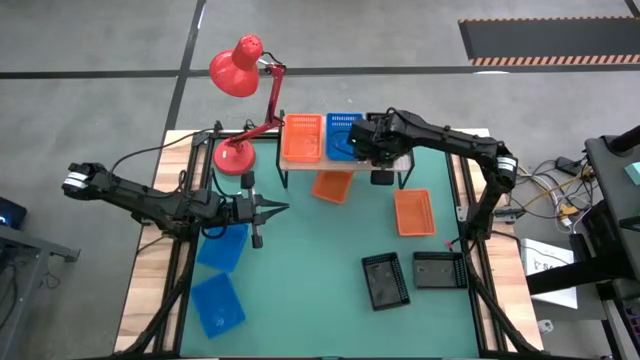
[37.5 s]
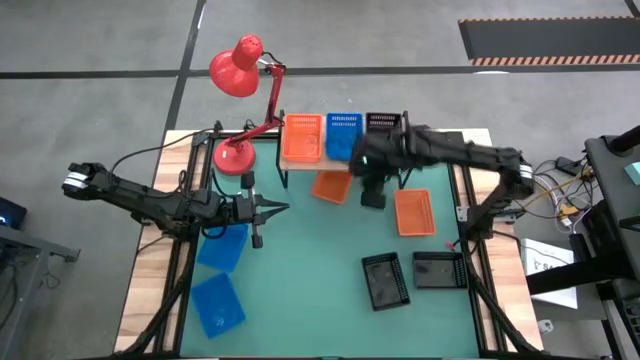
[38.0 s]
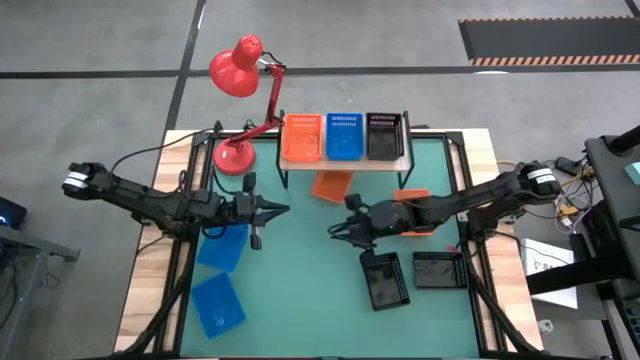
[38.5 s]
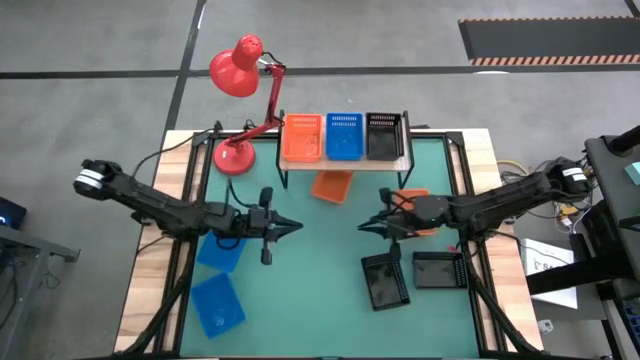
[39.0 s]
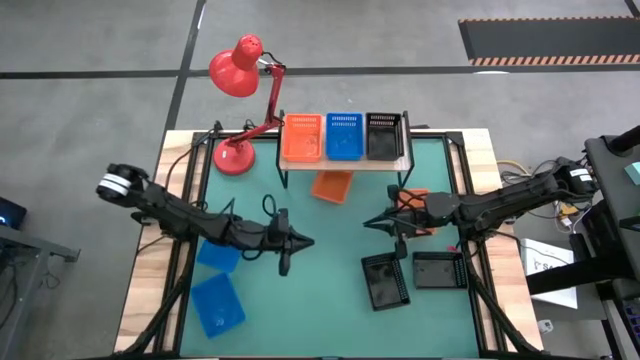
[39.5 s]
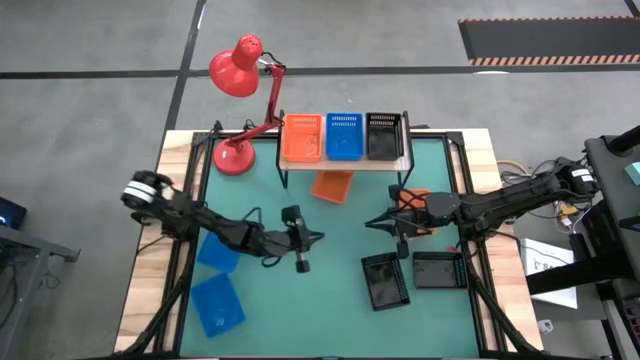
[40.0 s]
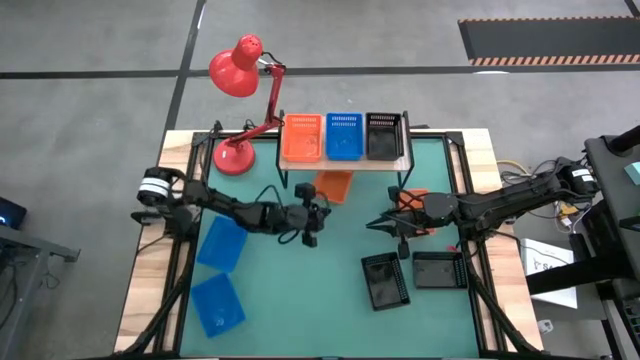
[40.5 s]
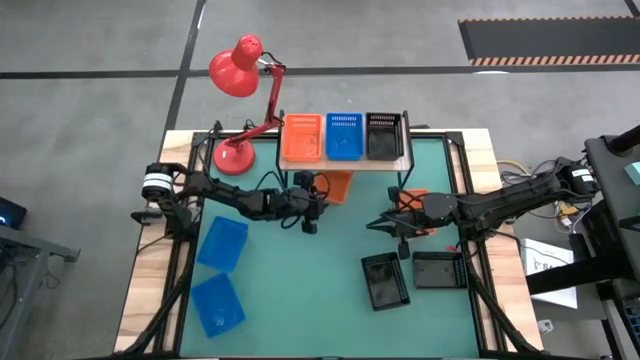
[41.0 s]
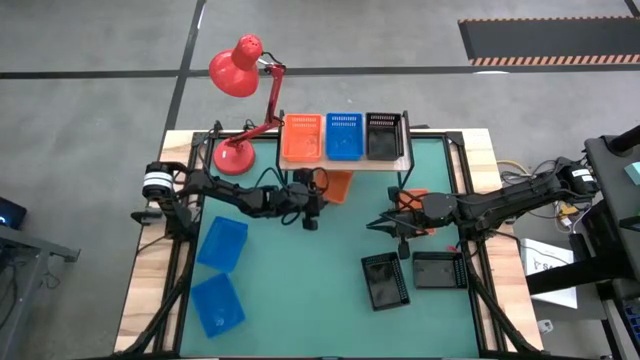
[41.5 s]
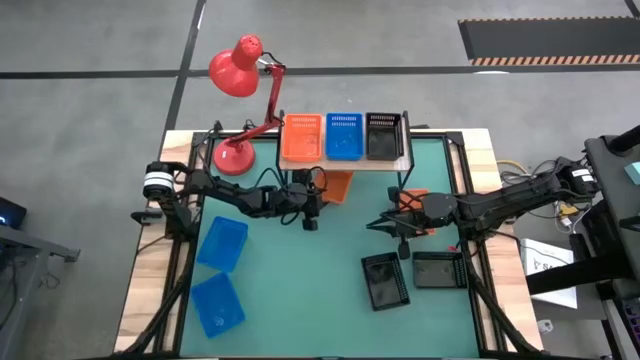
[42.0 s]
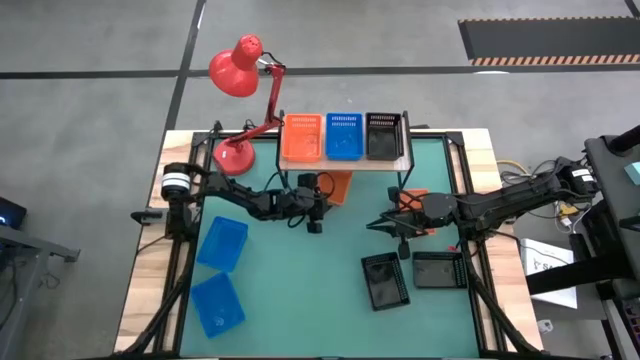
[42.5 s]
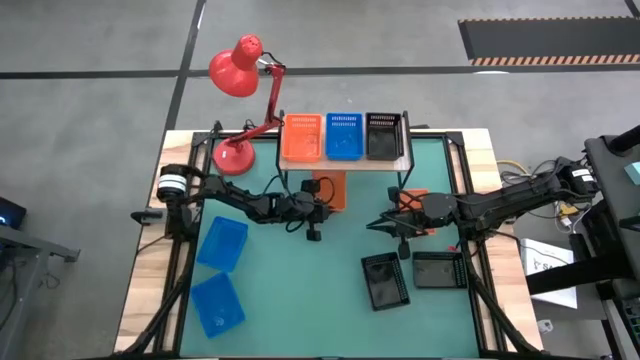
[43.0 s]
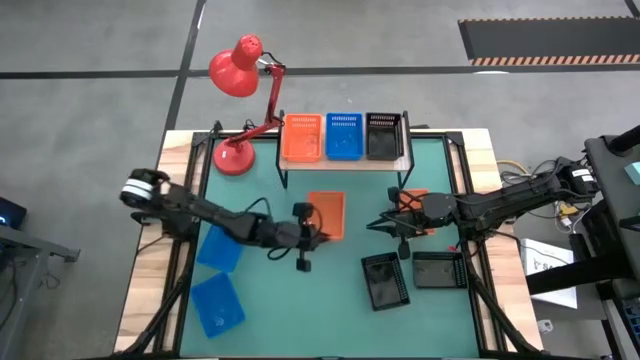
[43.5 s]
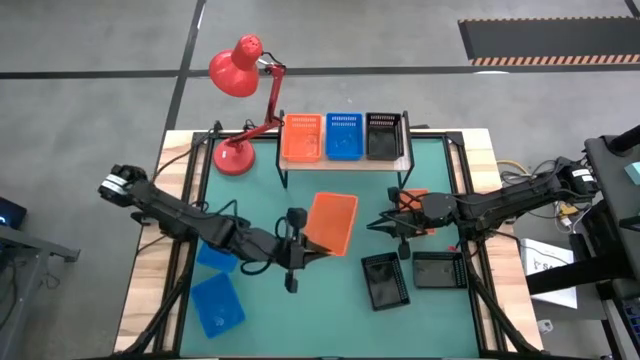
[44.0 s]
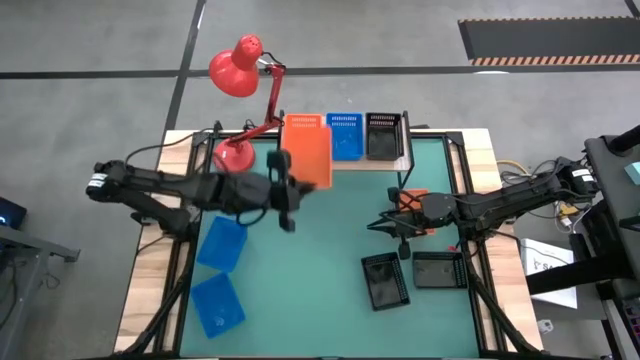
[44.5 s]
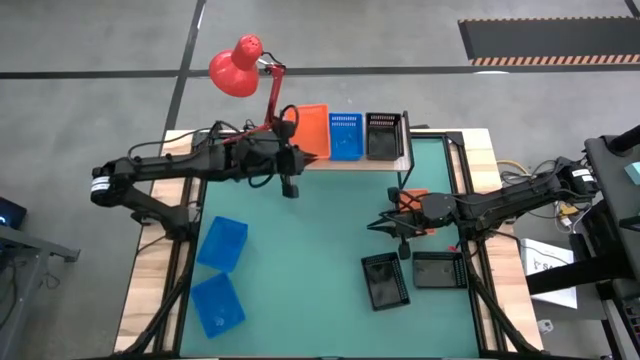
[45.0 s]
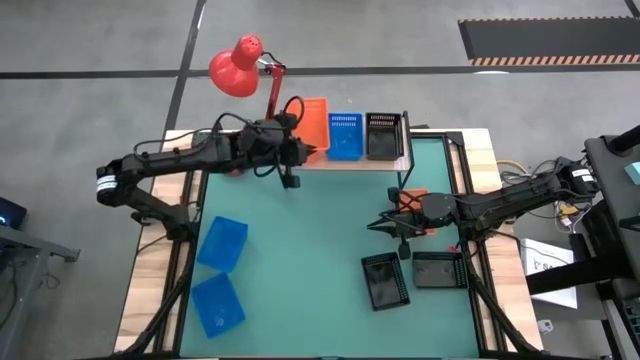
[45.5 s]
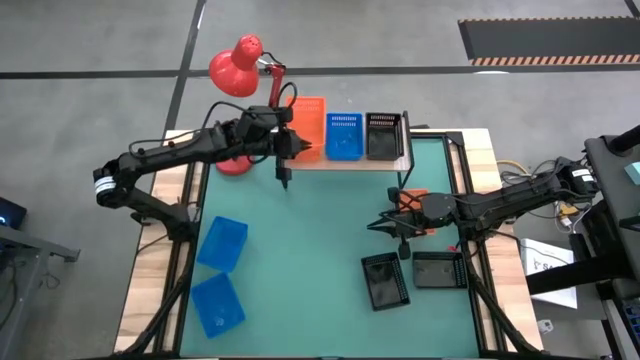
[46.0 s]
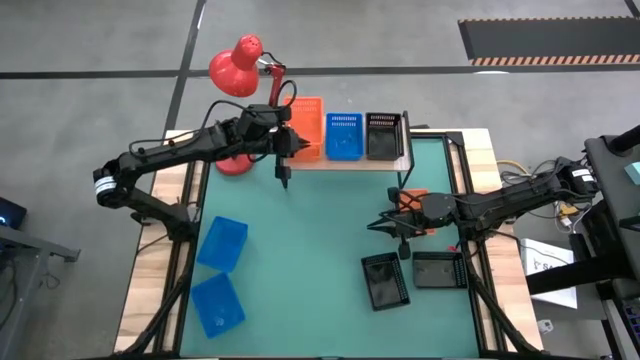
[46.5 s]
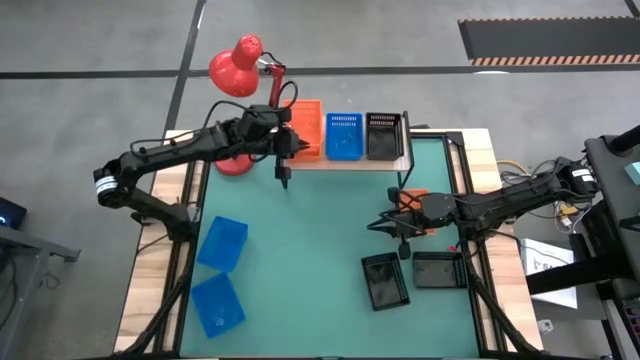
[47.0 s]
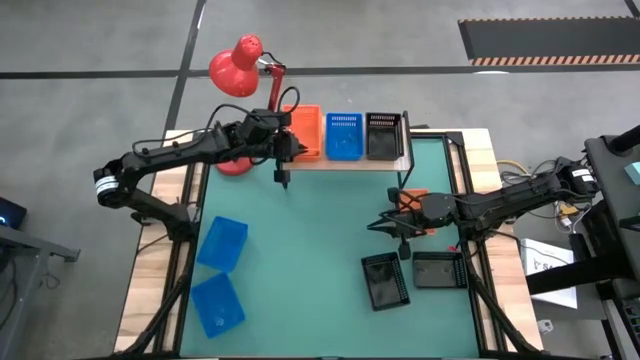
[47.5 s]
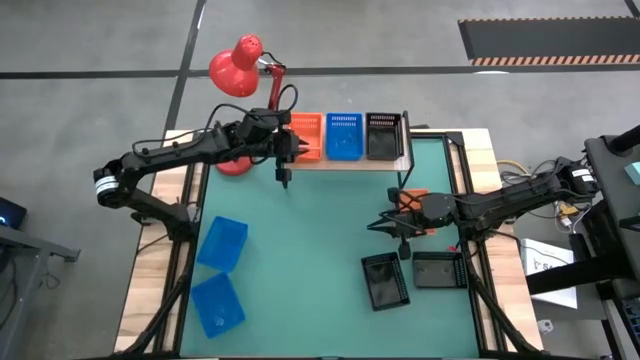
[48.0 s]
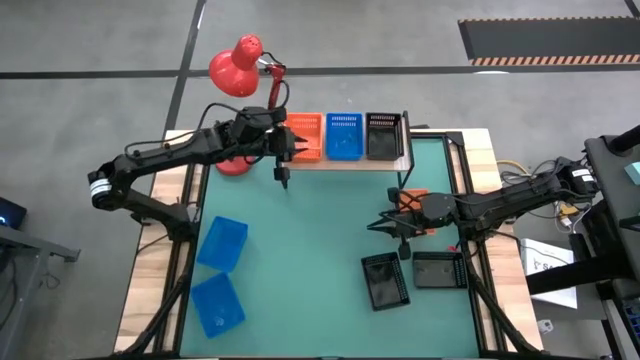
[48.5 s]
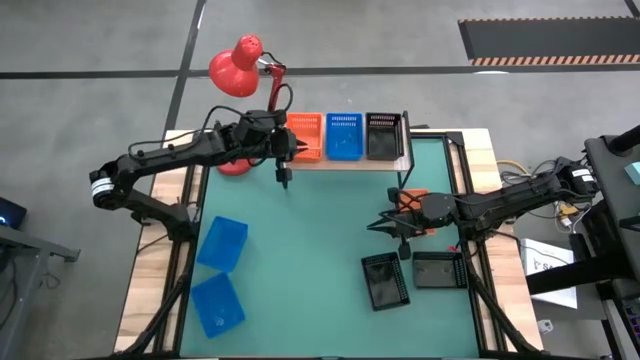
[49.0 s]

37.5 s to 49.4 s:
Task: Stack baskets on shelf by color
Stack the top orange bin on the other orange bin on the shelf

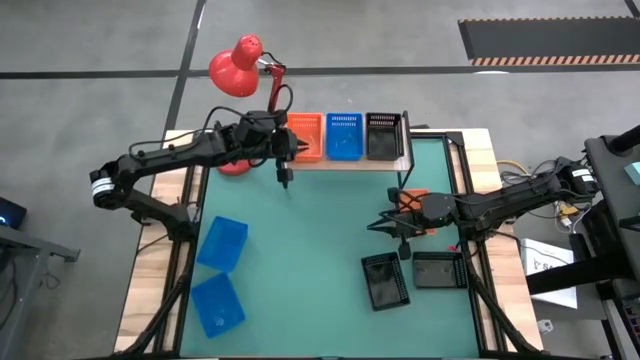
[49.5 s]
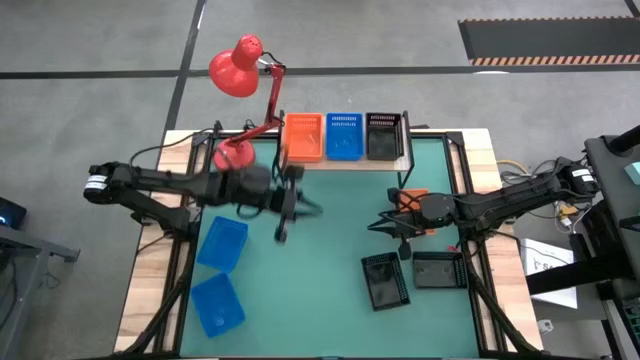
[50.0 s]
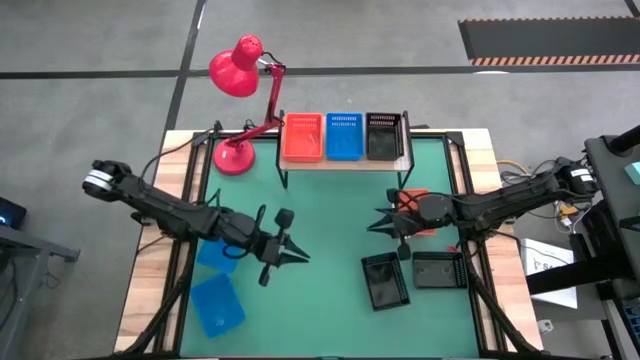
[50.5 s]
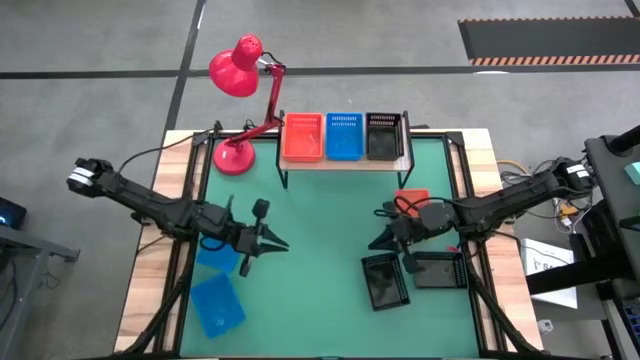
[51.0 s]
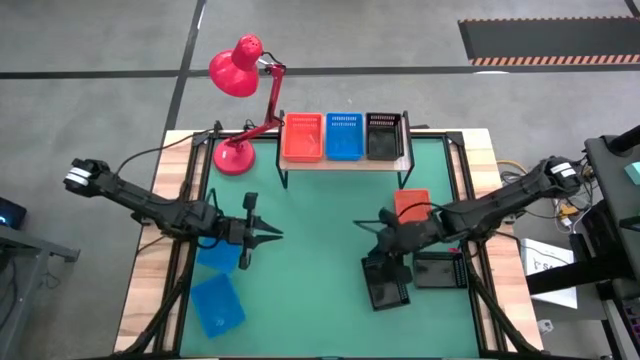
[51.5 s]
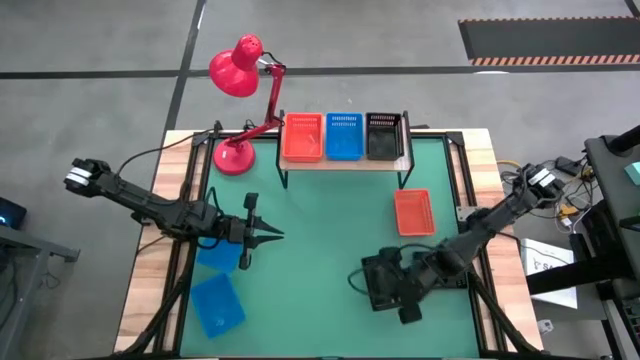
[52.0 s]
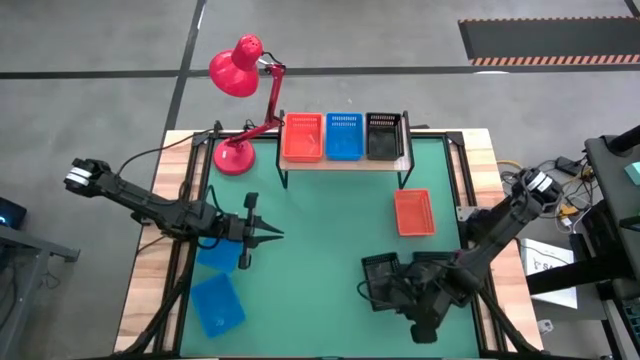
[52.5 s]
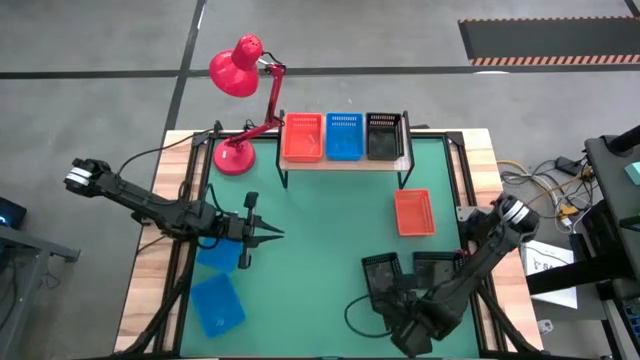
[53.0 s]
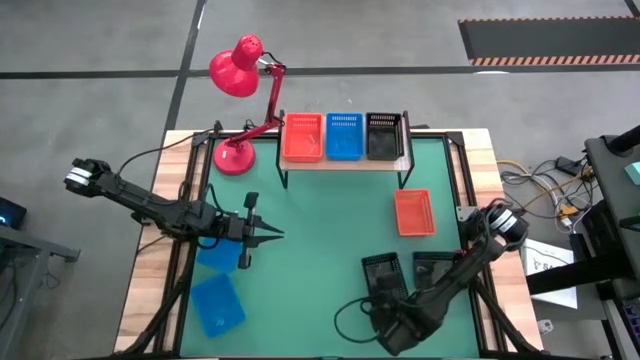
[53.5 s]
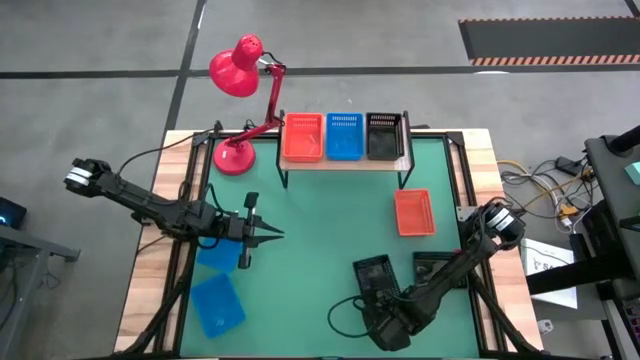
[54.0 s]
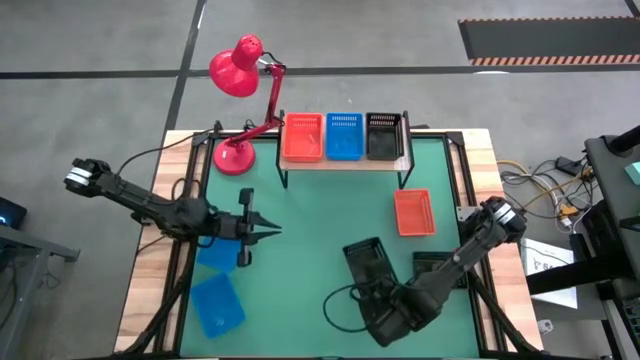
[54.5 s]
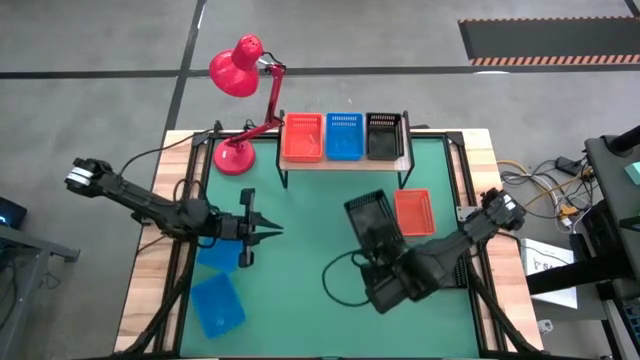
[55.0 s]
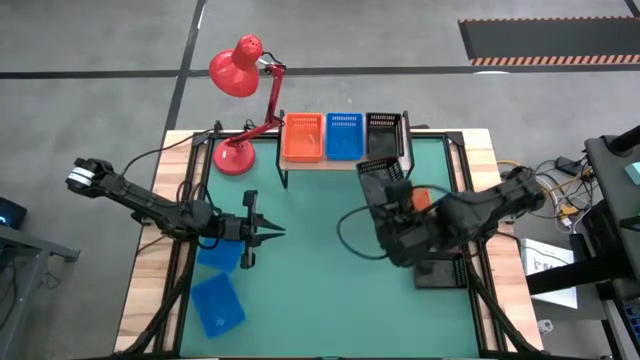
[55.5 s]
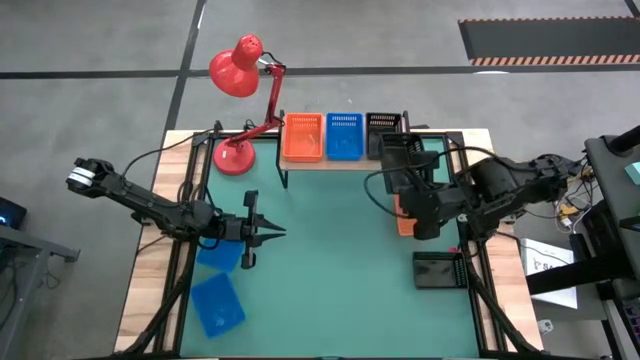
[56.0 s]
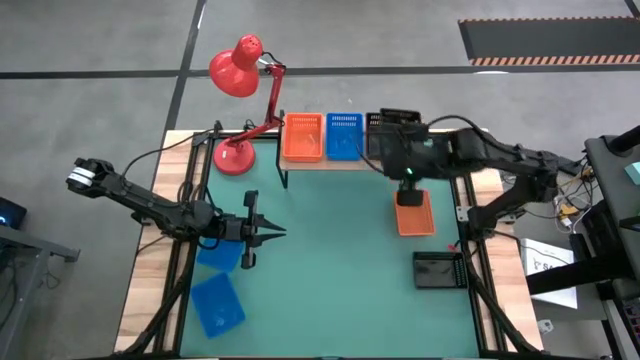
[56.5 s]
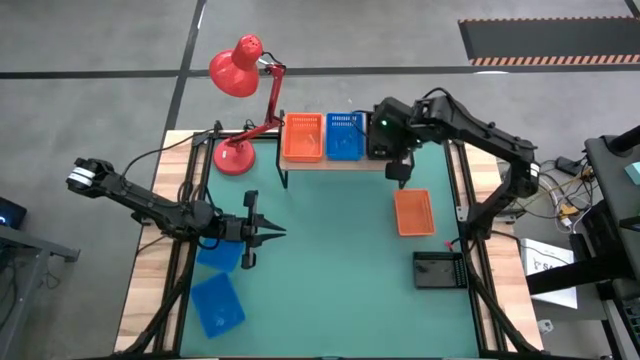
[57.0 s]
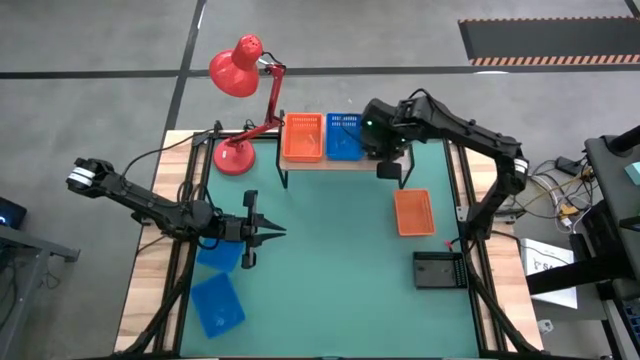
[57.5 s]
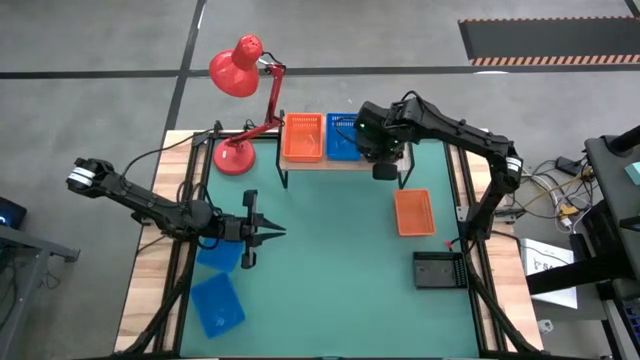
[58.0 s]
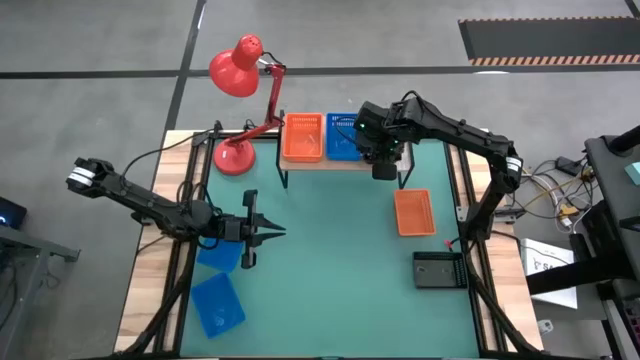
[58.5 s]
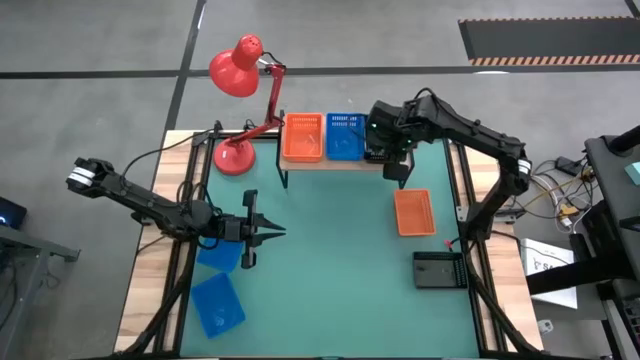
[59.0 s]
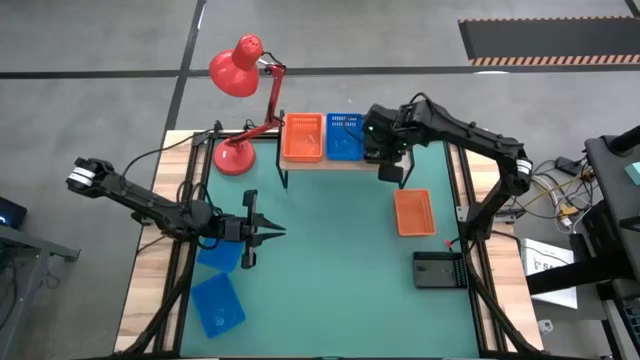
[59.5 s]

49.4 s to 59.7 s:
Stack the left black bin on the other black bin on the shelf
